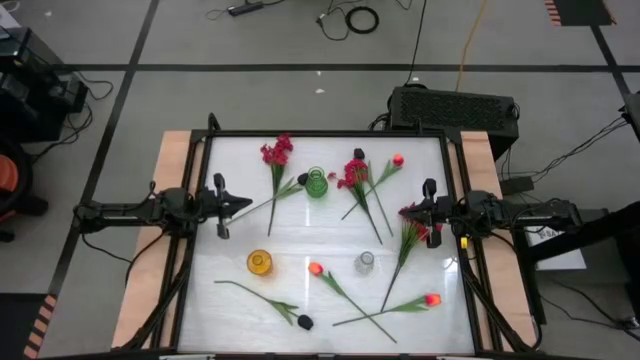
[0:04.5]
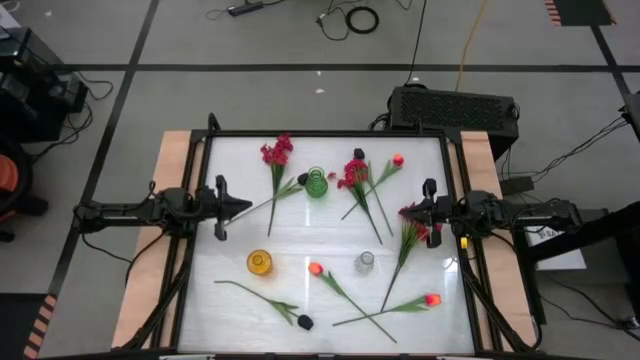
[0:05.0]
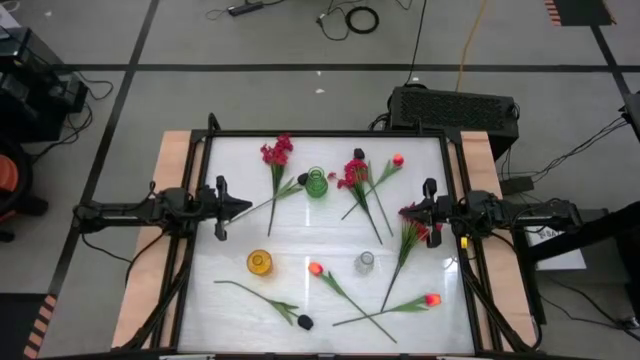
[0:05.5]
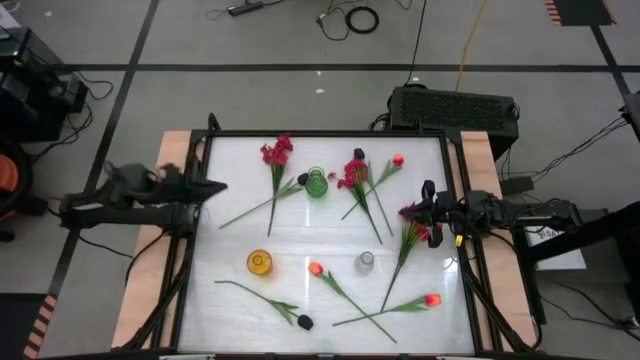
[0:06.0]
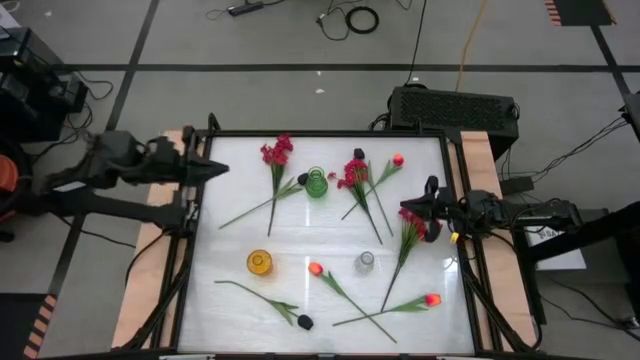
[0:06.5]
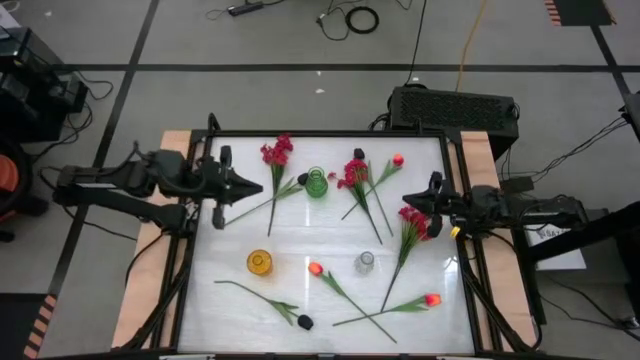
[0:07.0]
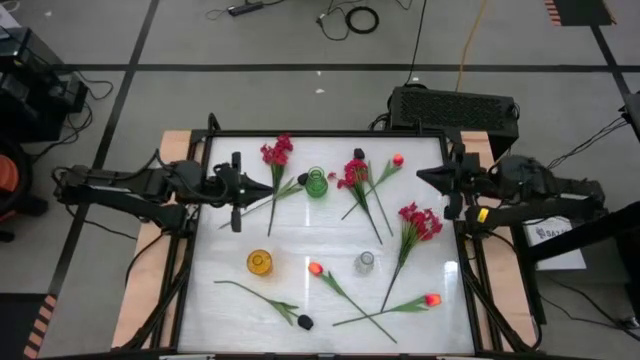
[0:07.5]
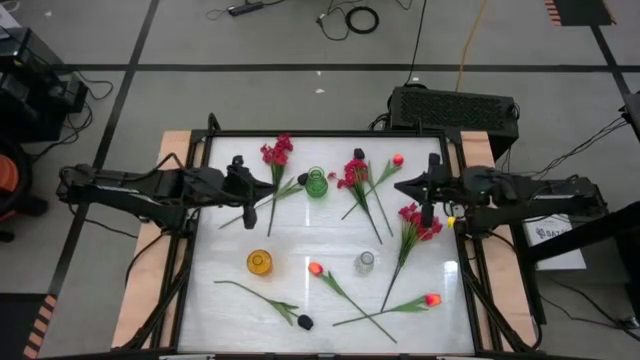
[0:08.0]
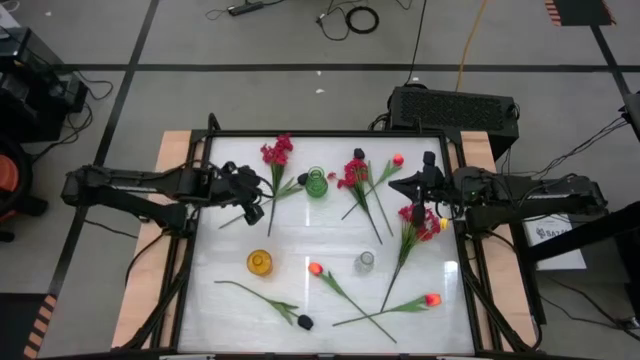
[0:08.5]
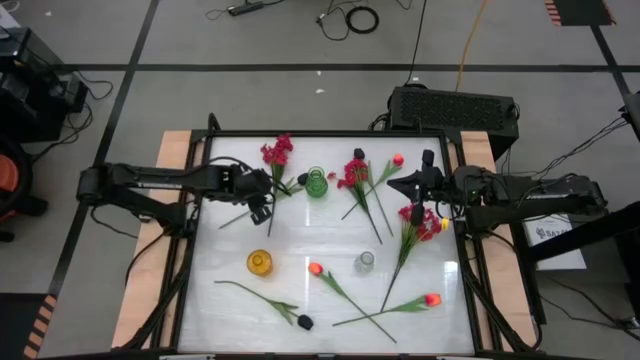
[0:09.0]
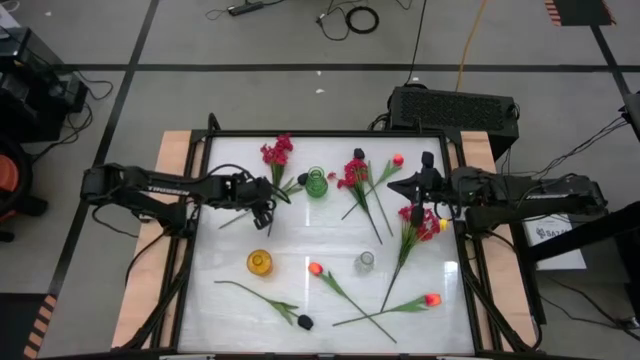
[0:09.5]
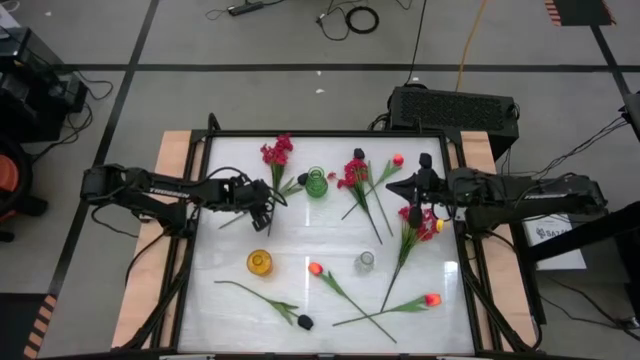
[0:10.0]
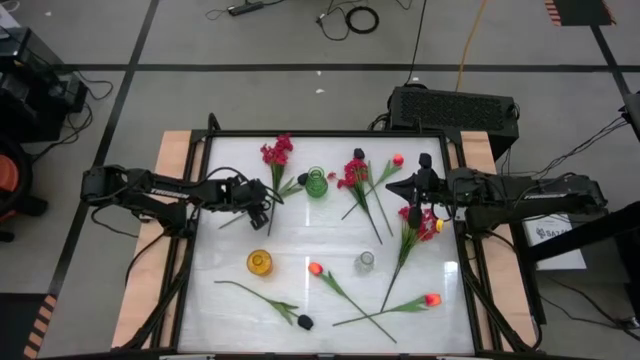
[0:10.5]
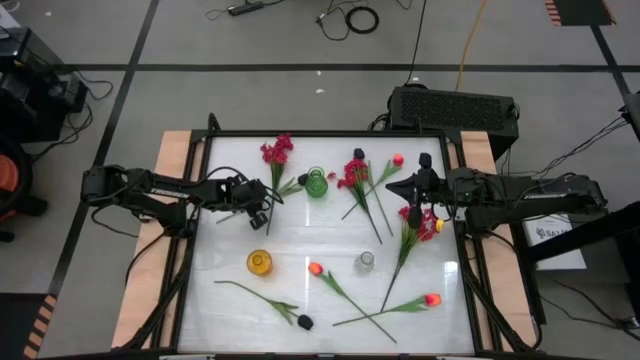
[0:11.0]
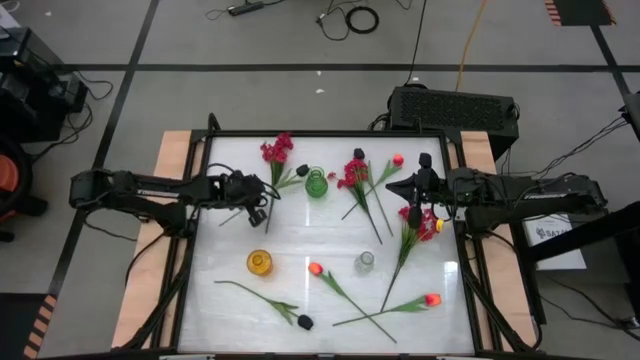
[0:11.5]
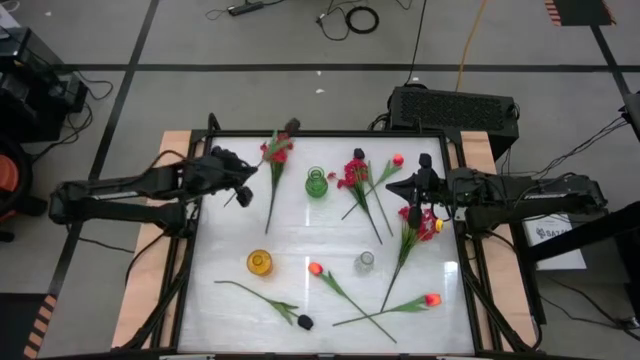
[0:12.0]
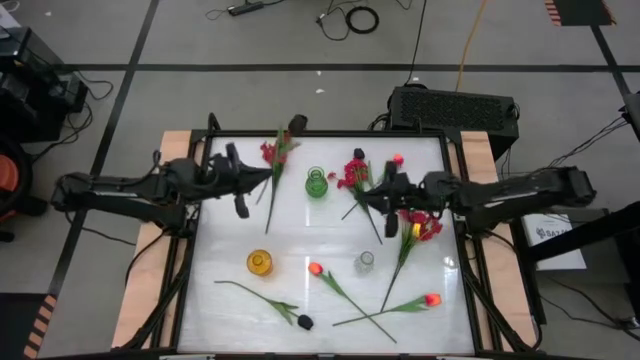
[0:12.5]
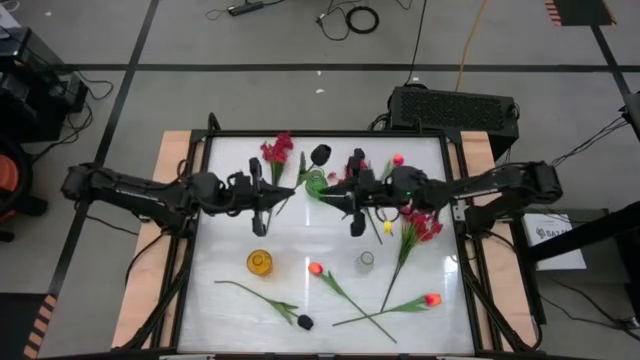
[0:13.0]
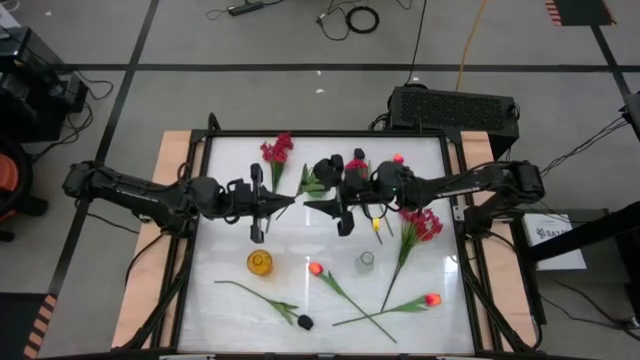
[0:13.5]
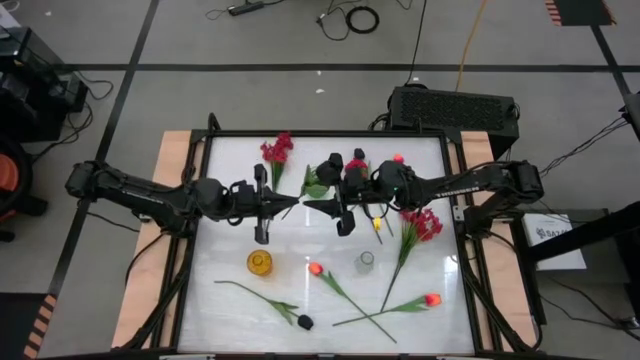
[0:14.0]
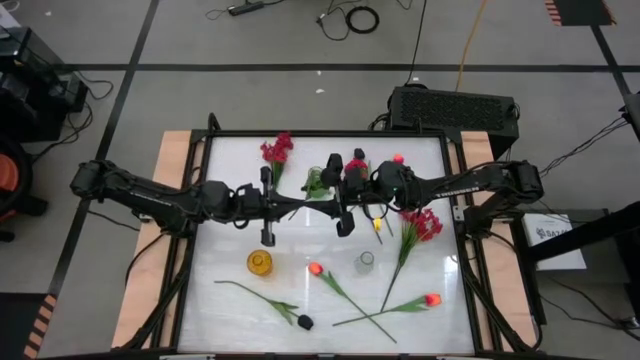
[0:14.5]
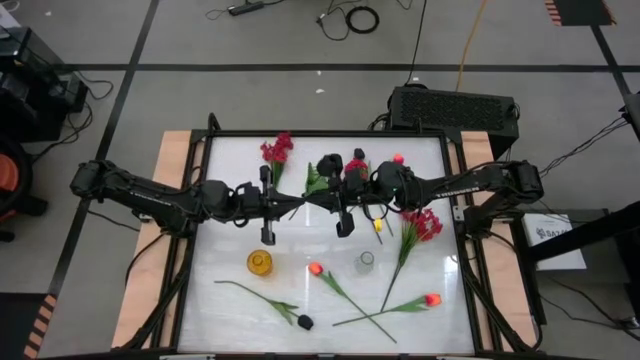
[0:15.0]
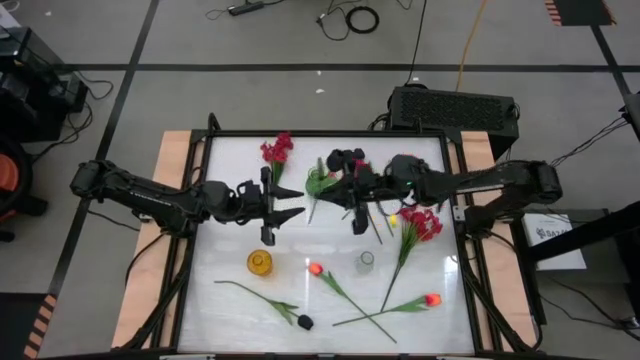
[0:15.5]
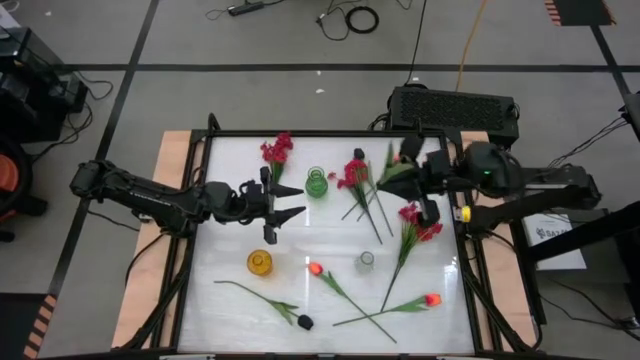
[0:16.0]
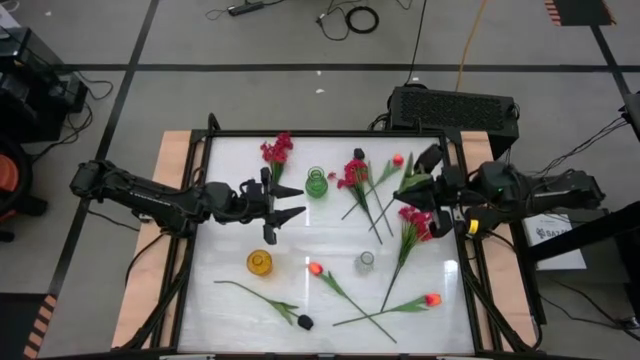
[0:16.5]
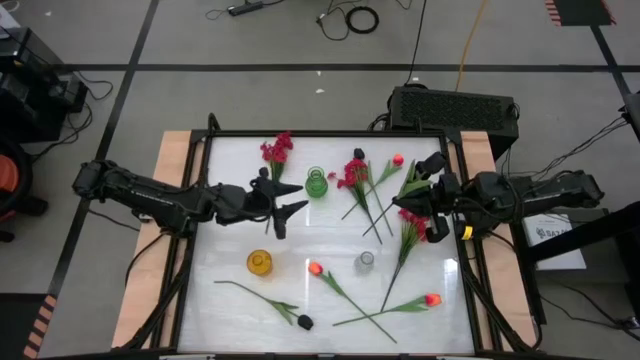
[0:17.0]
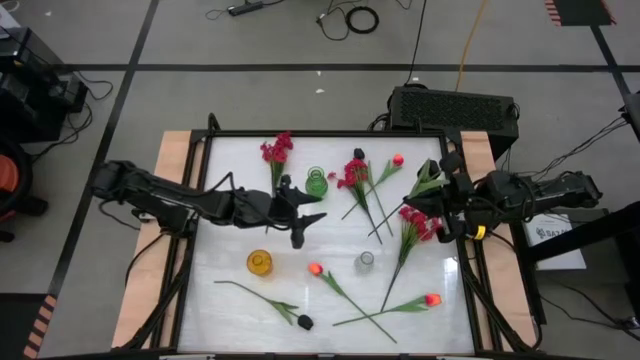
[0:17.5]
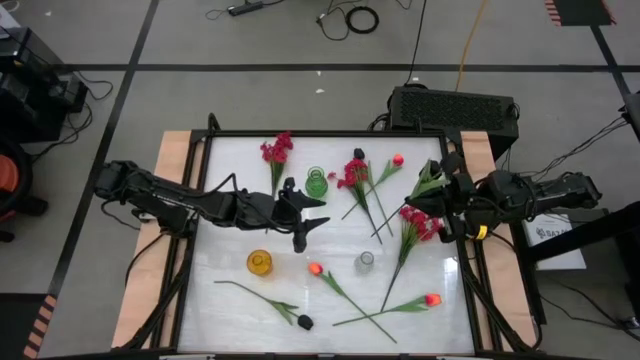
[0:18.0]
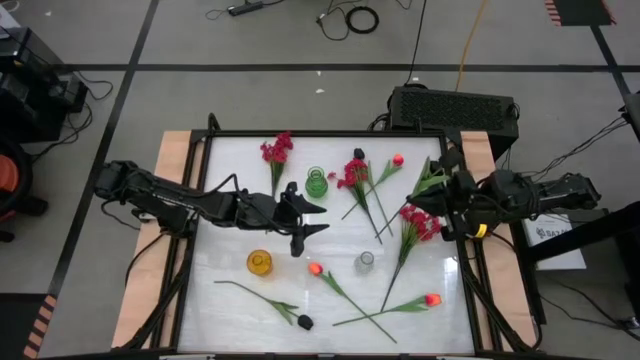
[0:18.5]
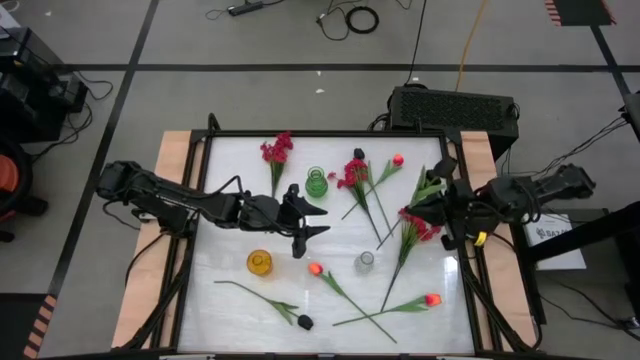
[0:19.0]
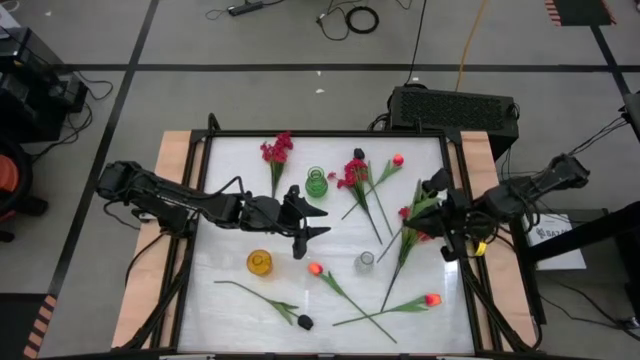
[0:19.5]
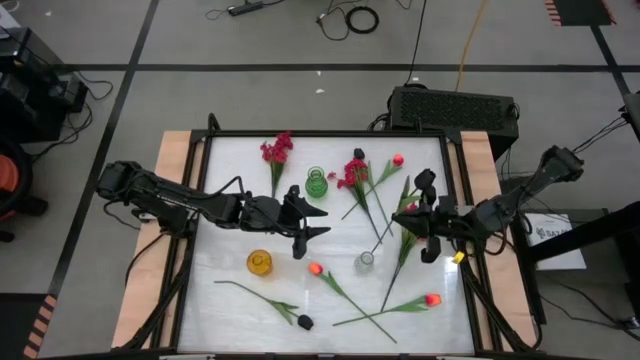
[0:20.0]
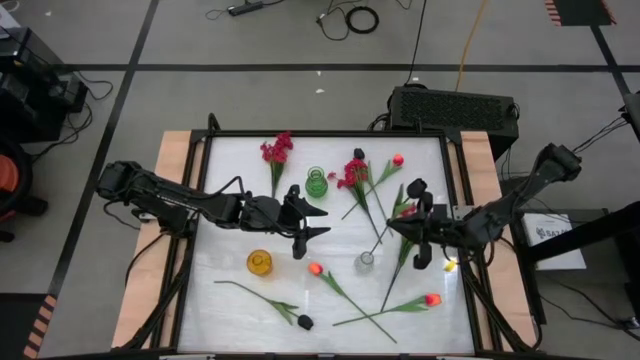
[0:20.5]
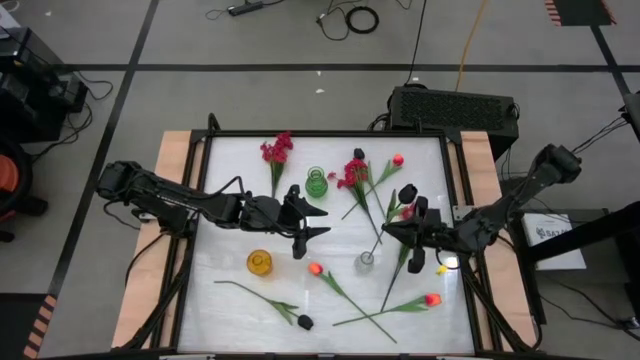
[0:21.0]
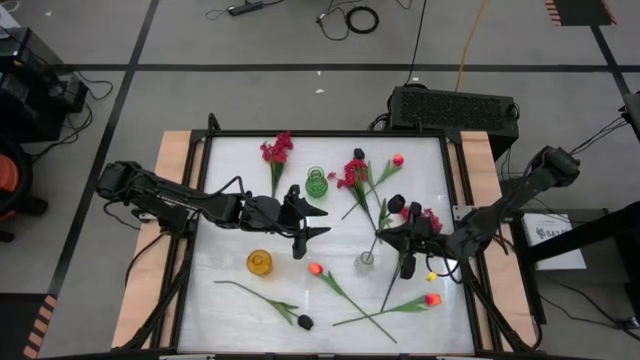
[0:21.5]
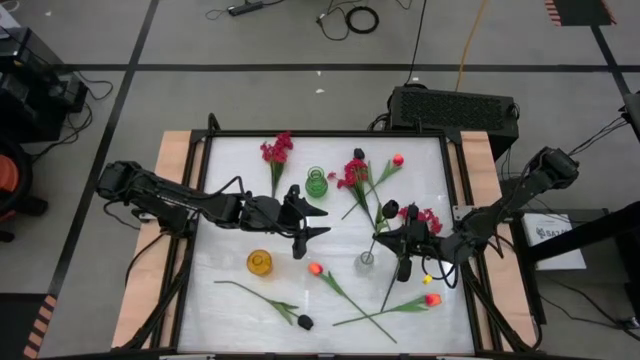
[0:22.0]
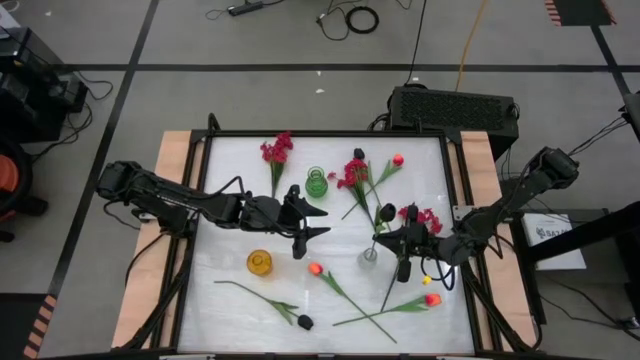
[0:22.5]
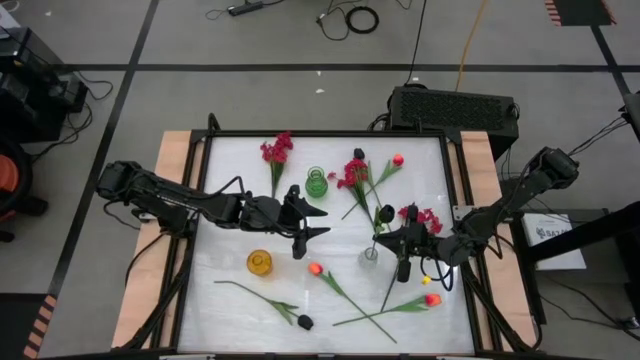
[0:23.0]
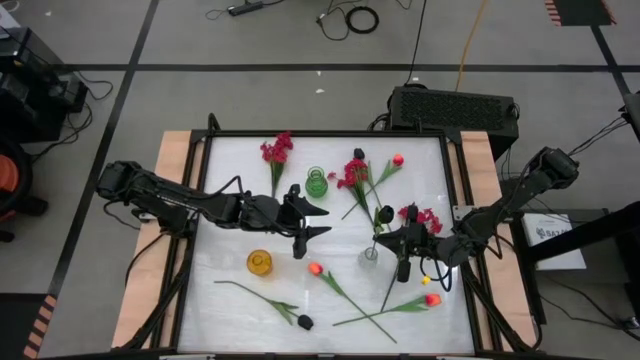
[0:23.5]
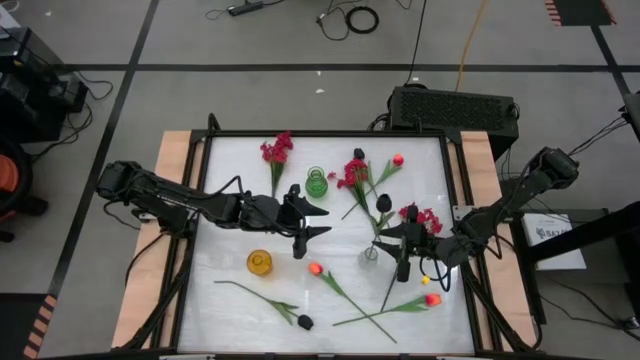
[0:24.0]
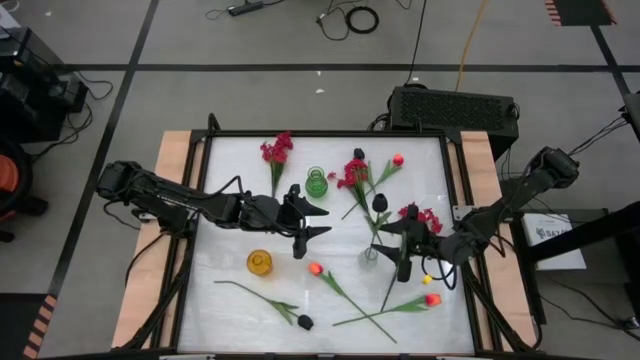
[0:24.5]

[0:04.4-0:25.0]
Task: Sort flowers into vase by color
Put top left black flower into the transparent vase
